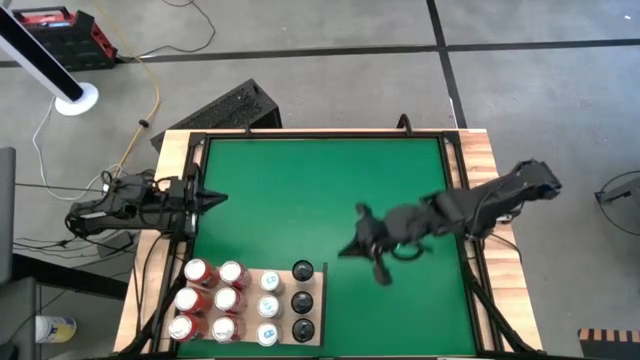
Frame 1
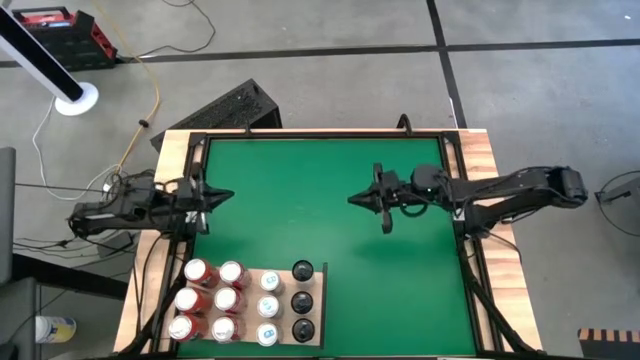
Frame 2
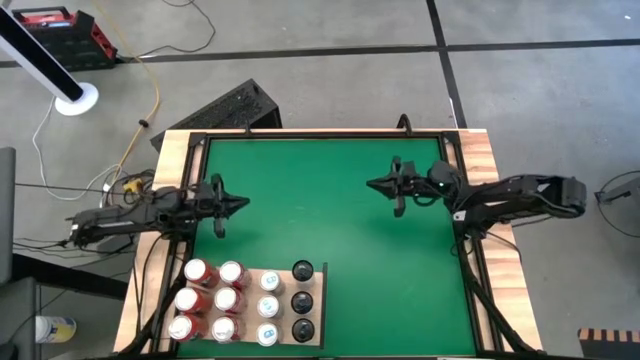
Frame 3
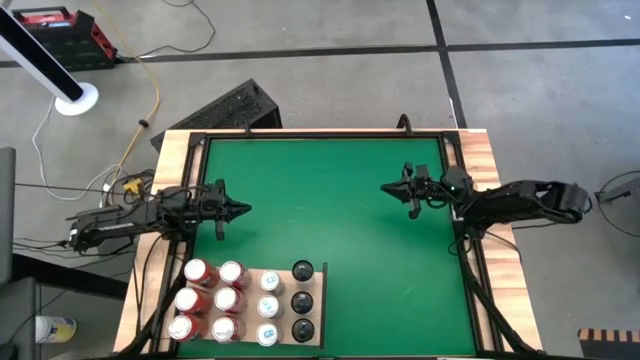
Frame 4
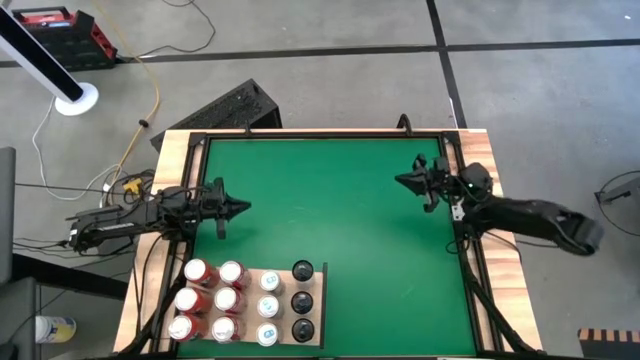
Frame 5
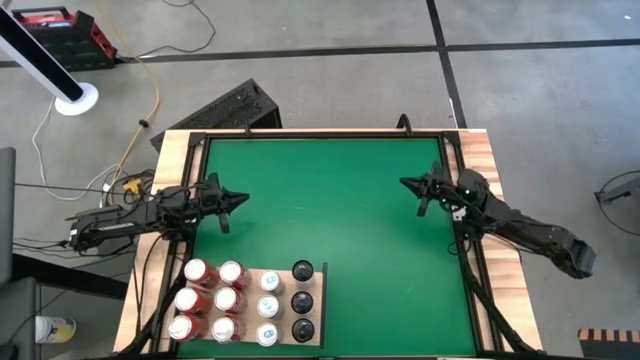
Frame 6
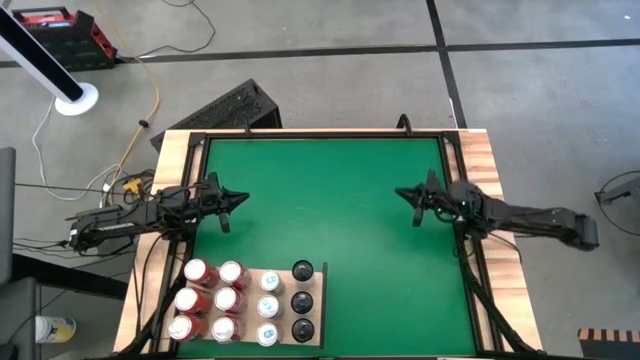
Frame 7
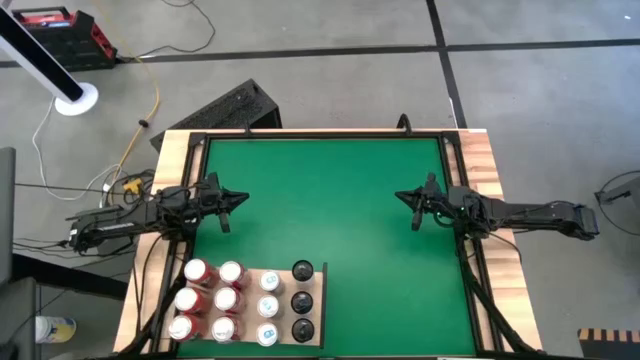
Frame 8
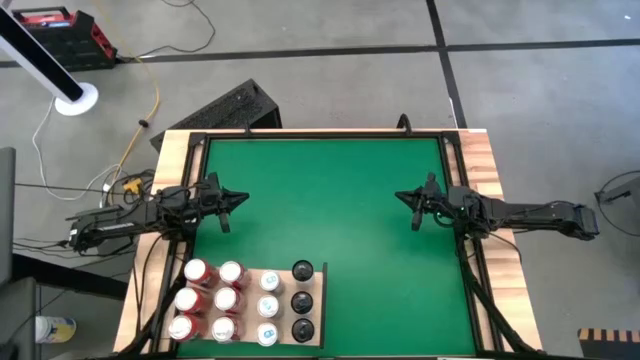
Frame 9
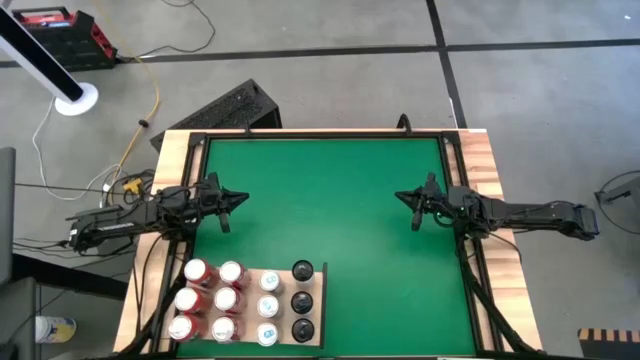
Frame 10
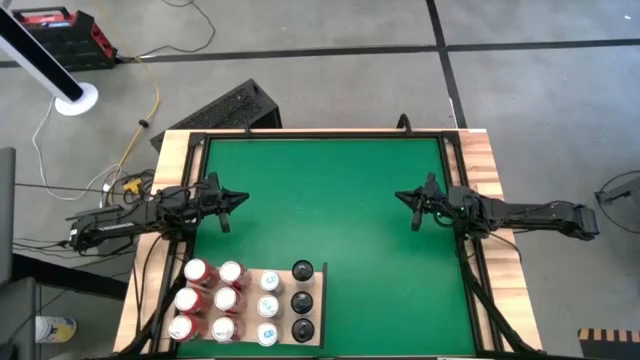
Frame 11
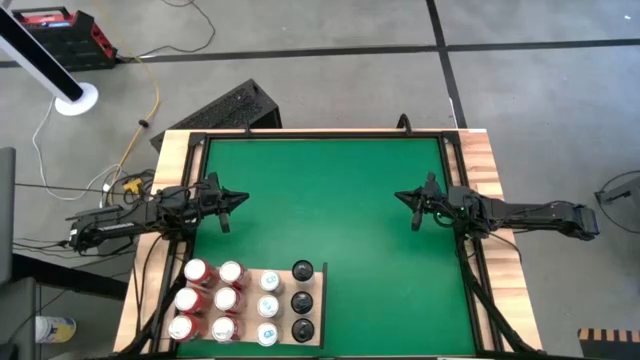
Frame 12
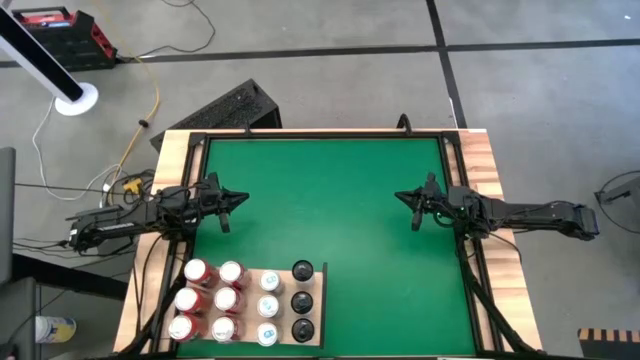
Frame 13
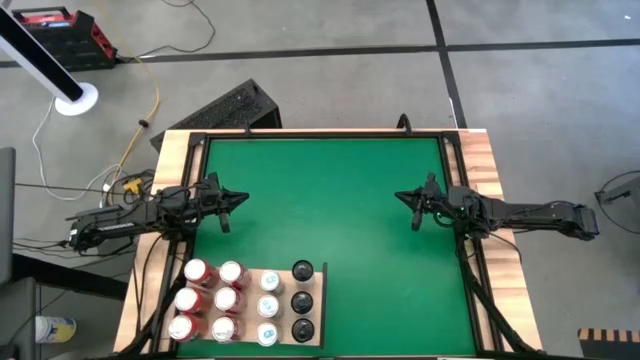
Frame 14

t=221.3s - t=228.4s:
Task: Place canned beverage on shelf
Return to Home Position

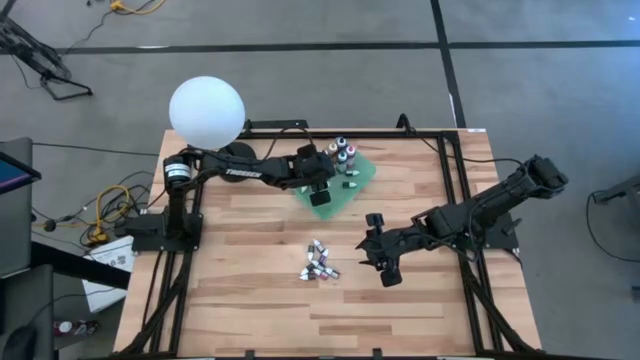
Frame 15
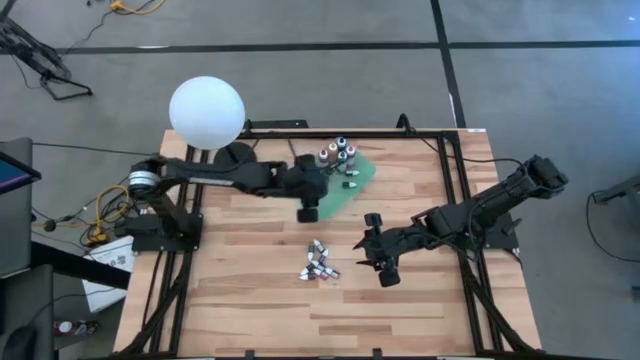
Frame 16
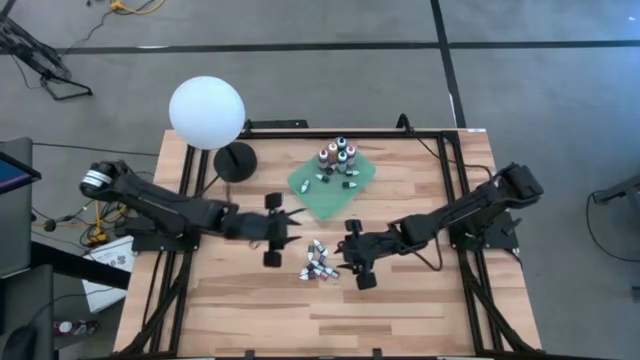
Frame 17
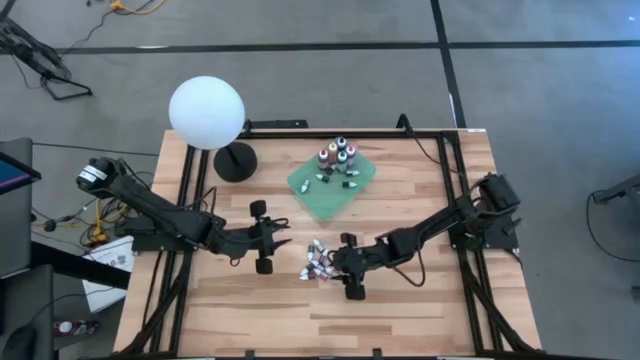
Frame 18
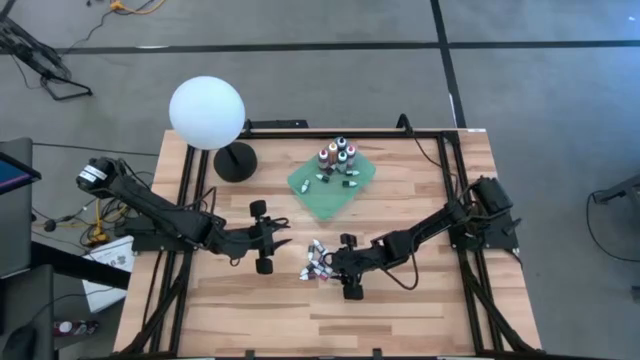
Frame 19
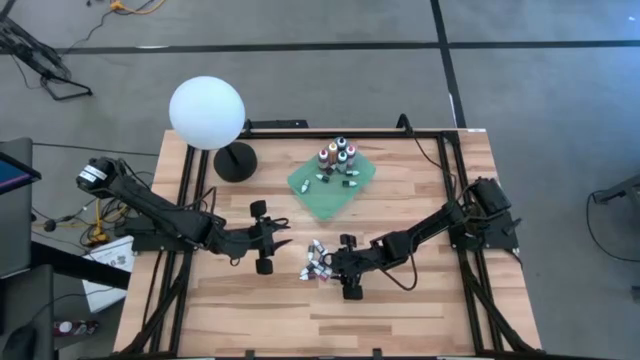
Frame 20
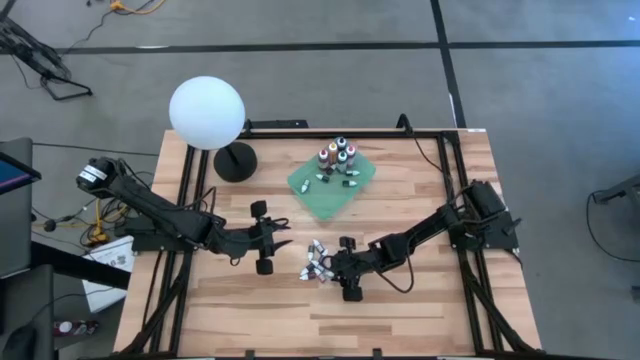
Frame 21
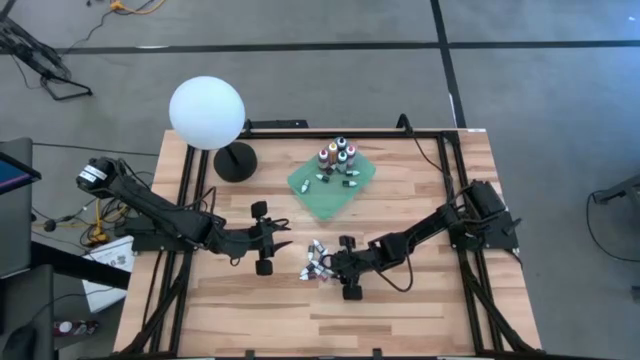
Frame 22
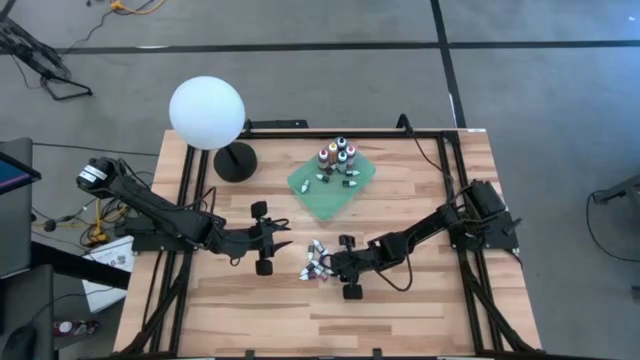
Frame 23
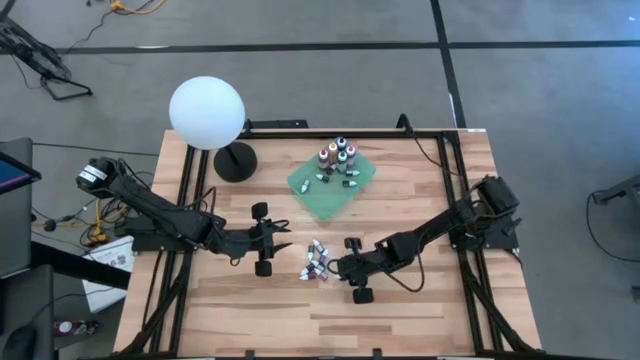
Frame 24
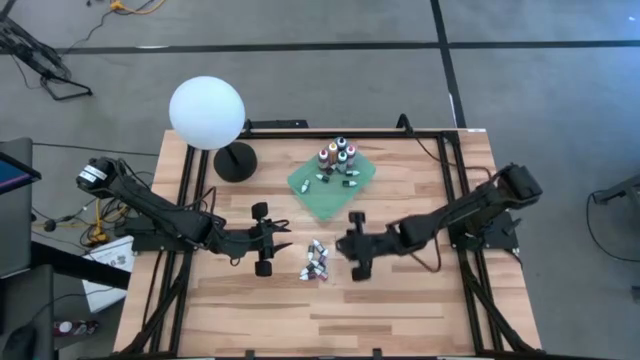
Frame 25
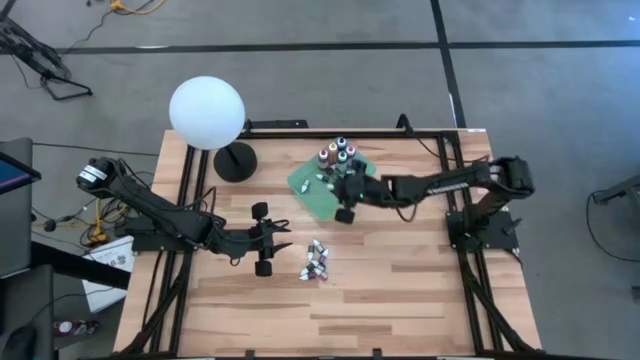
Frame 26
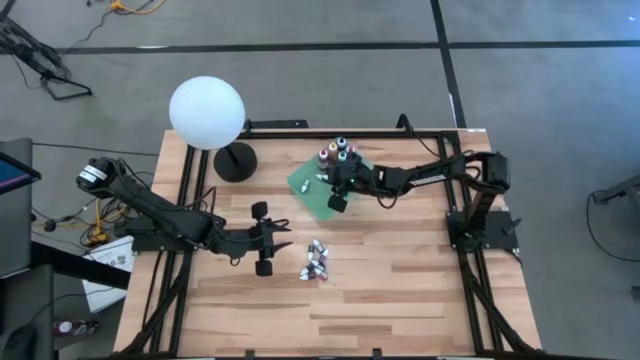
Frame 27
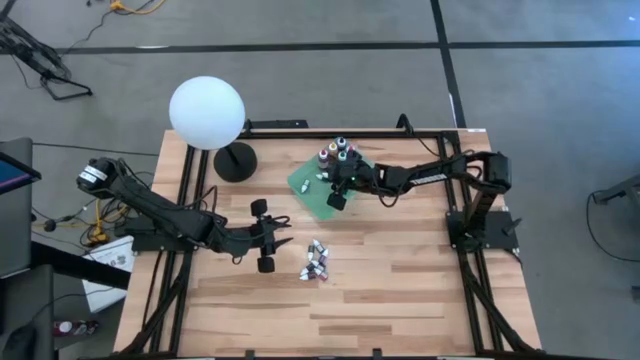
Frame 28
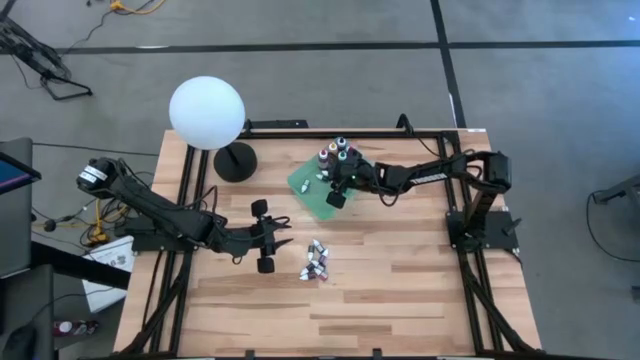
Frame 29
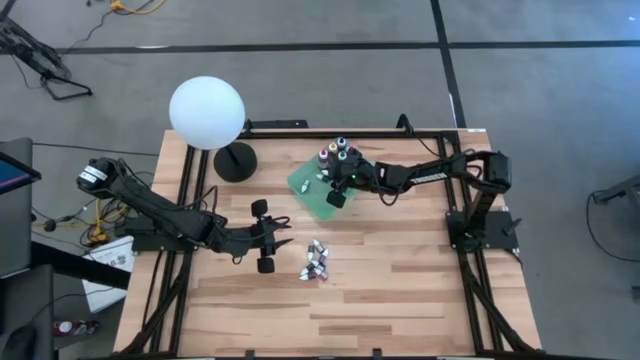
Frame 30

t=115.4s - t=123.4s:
Task: Pick & Place food coloring
Put the right black food coloring bottle into the green bin

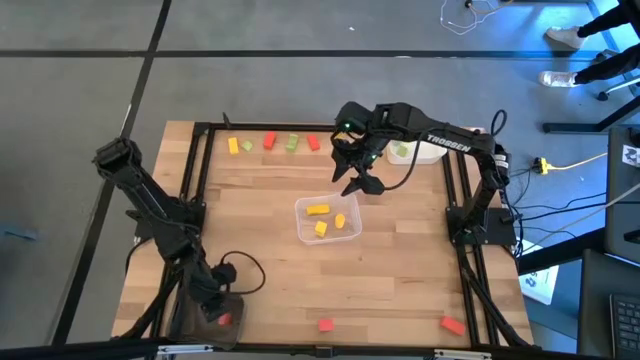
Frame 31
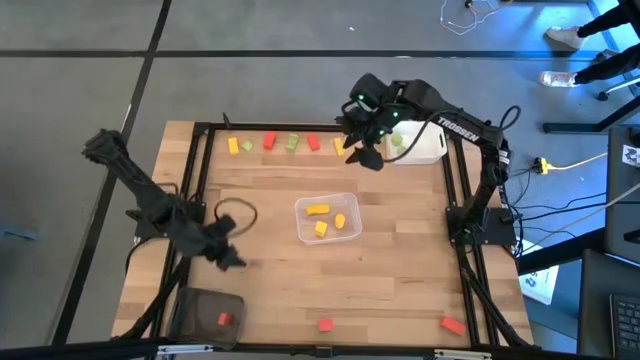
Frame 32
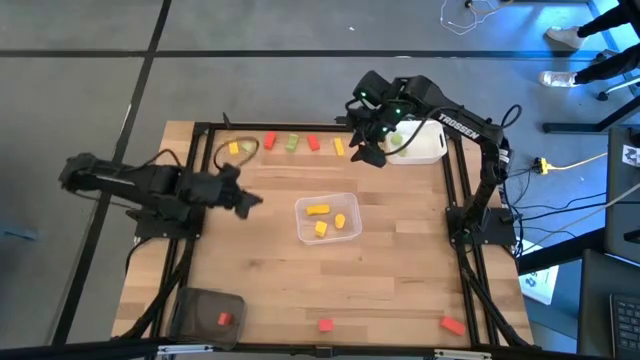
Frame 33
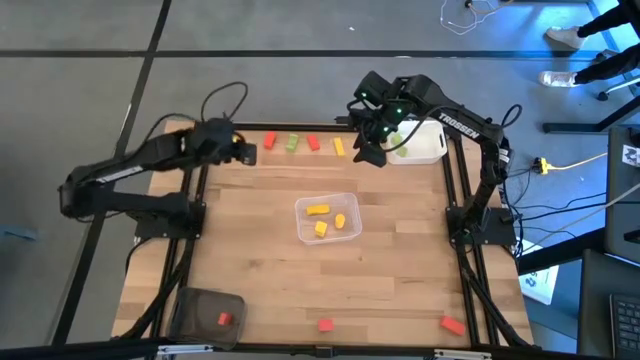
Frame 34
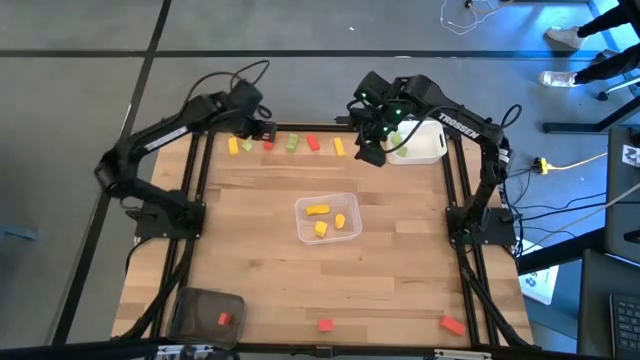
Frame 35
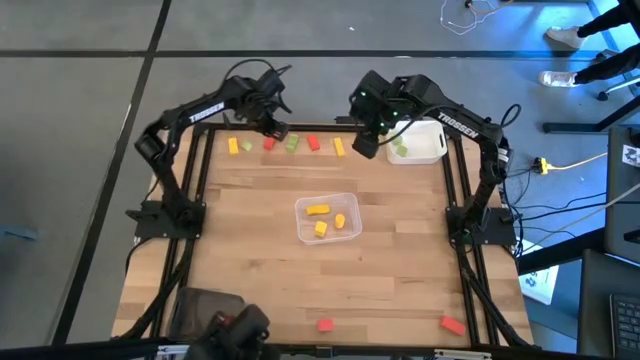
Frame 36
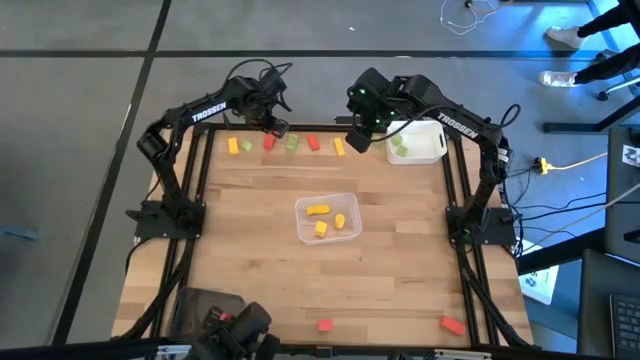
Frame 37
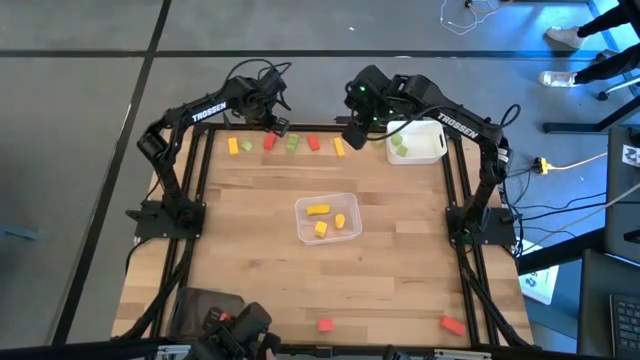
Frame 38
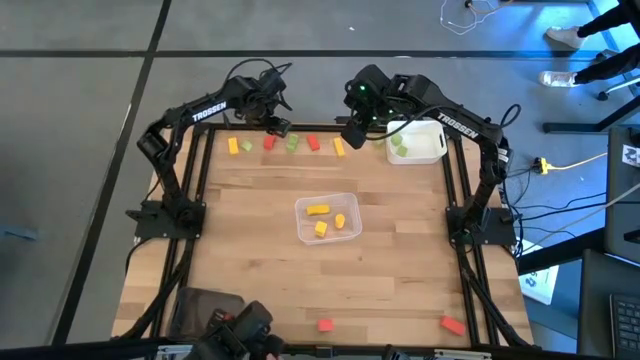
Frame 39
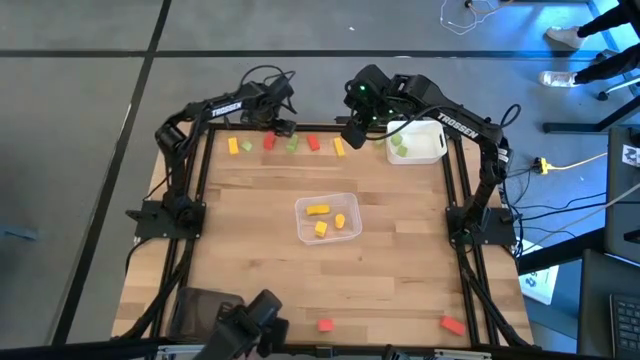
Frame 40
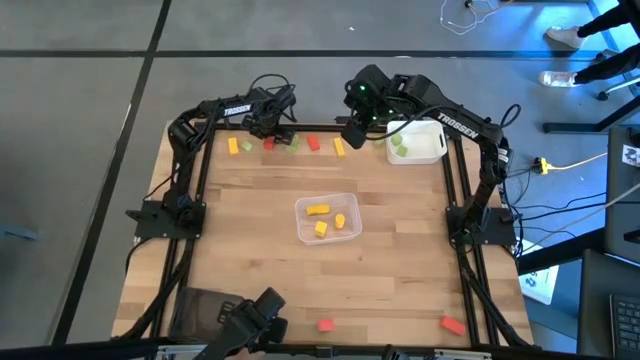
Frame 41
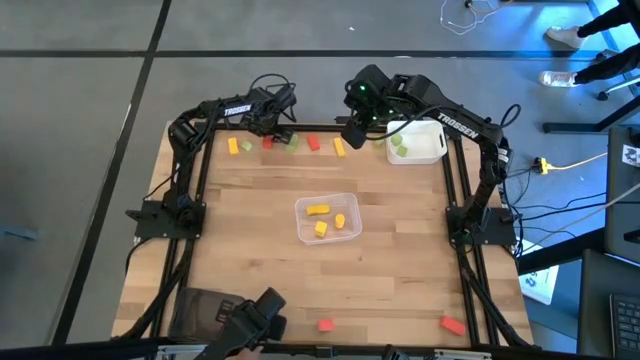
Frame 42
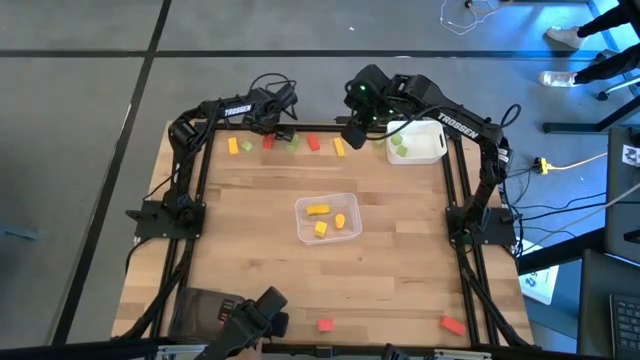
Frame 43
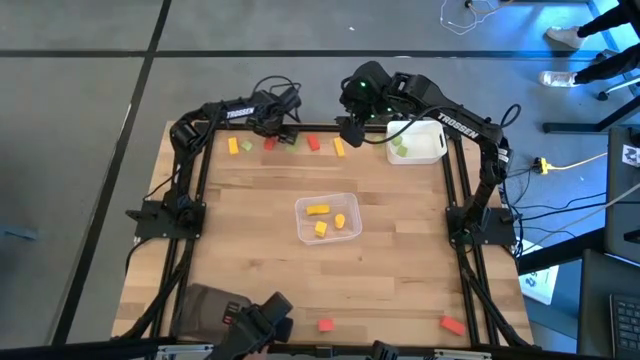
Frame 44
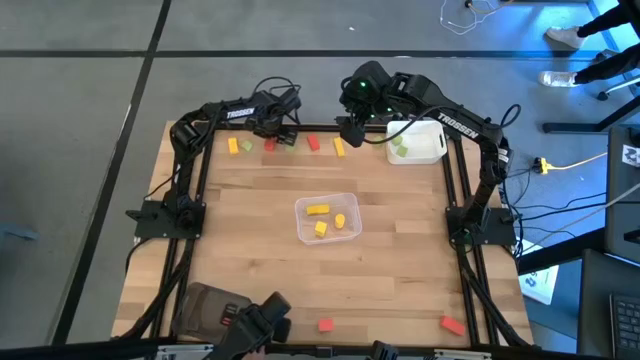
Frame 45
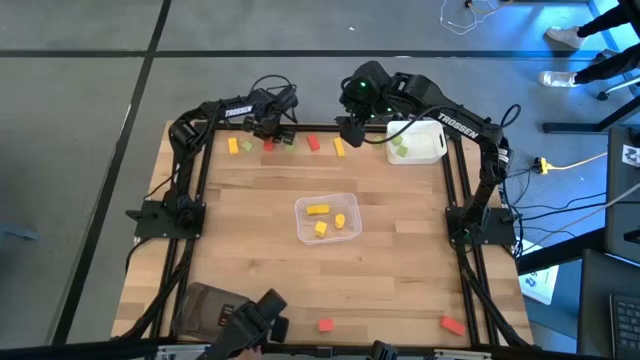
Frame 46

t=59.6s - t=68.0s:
Task: Sort & place blocks by color
Put the orange block into the black bin
